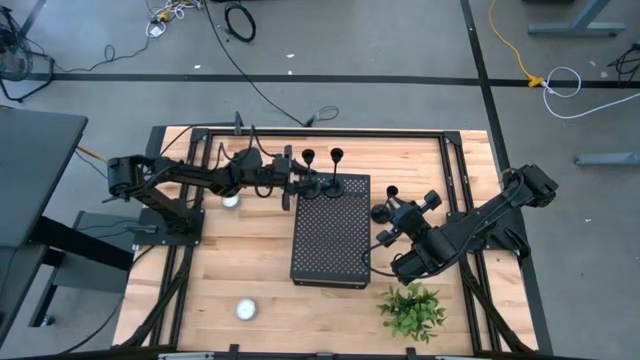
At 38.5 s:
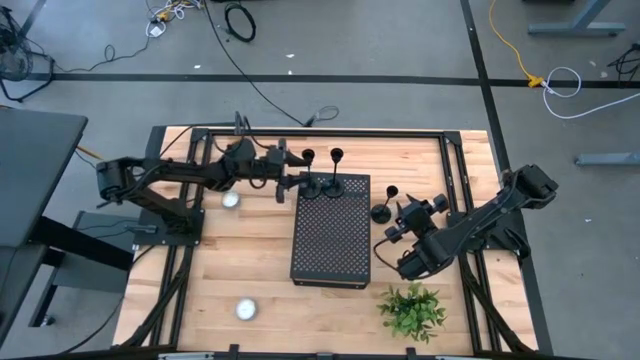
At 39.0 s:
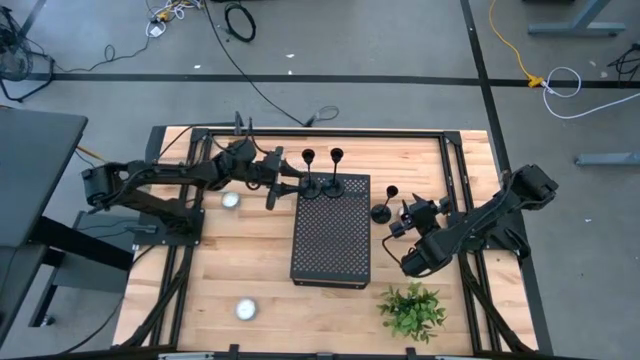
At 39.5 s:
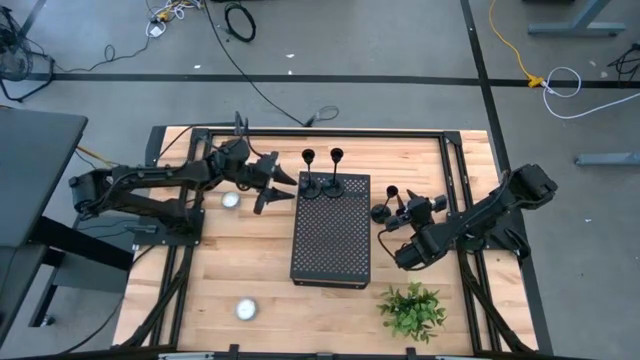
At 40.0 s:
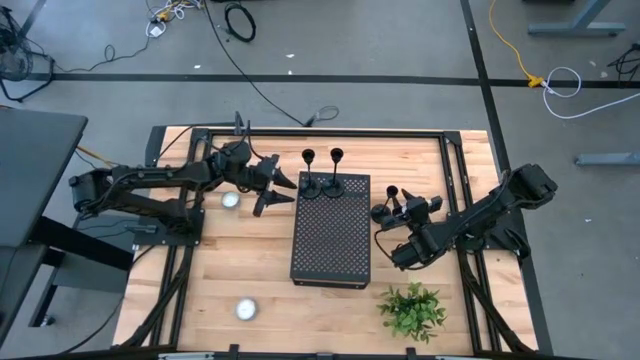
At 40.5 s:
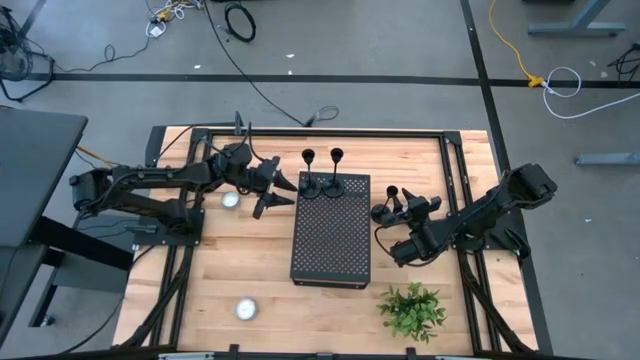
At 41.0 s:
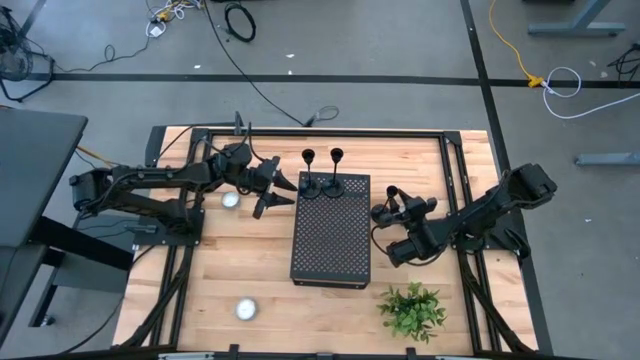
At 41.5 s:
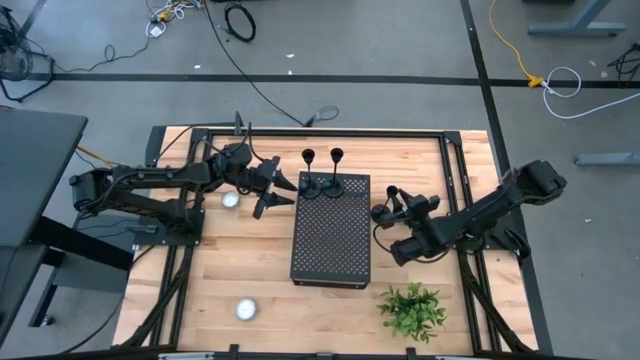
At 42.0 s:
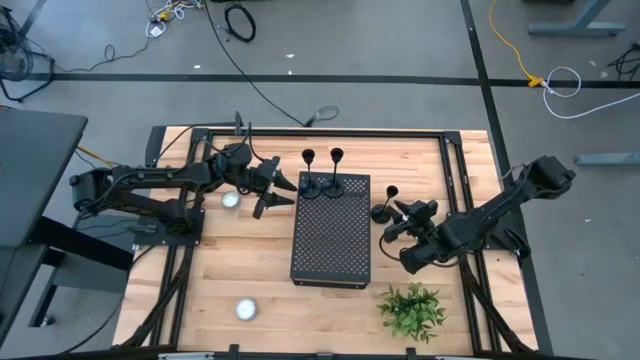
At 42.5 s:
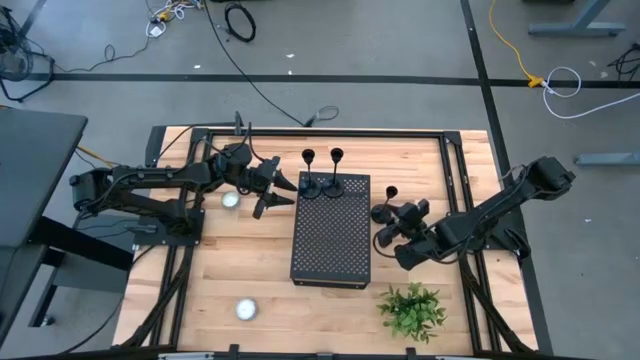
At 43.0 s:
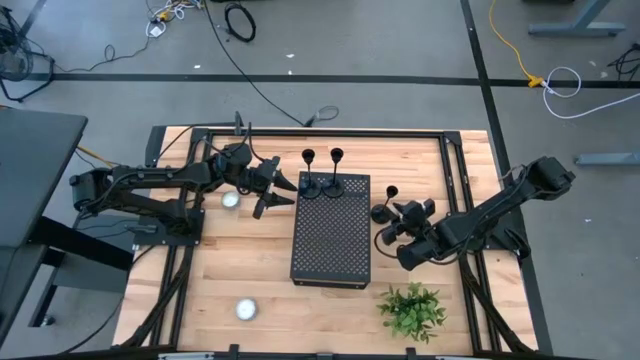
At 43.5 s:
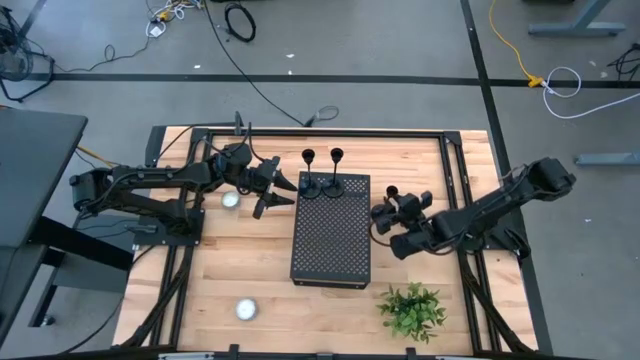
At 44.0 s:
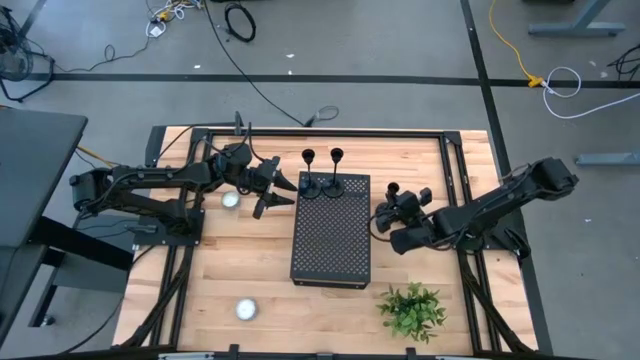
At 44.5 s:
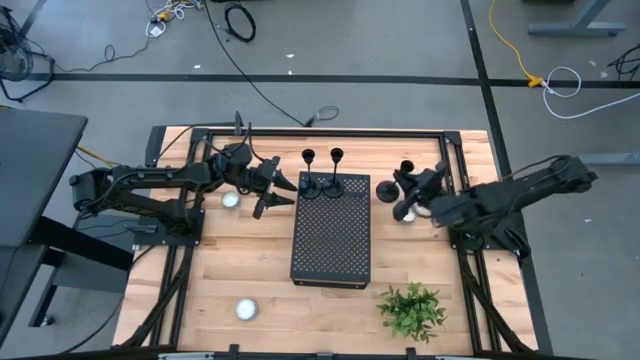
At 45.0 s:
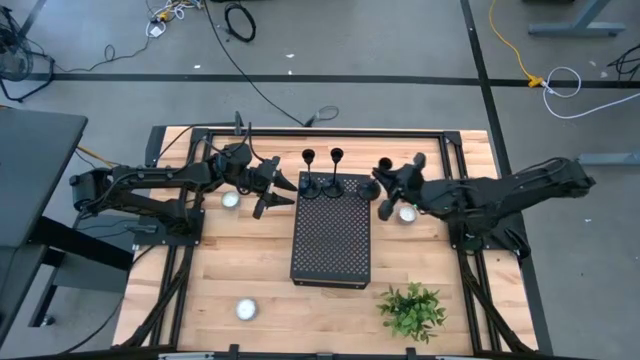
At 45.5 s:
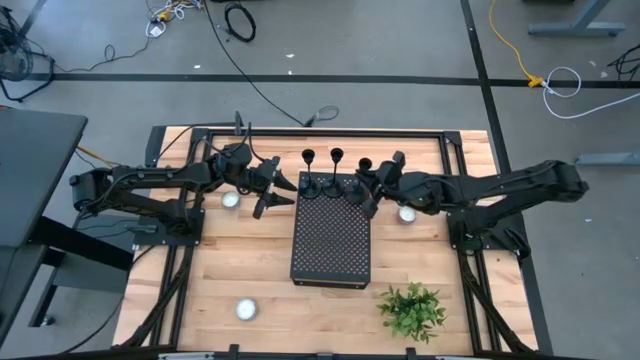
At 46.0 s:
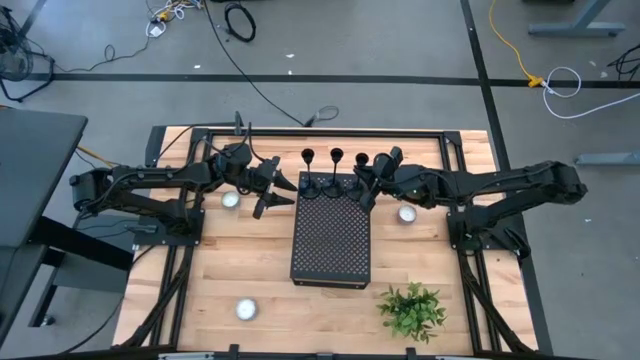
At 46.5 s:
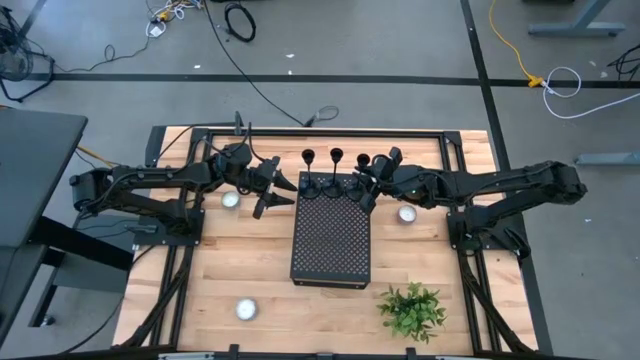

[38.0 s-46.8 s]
Task: Pick & Place candle stick holders
Put the black candle holder on the shelf

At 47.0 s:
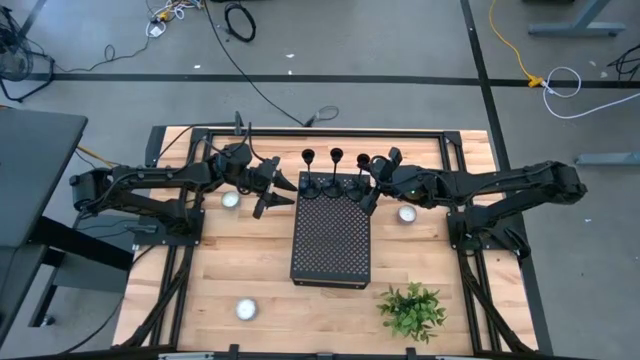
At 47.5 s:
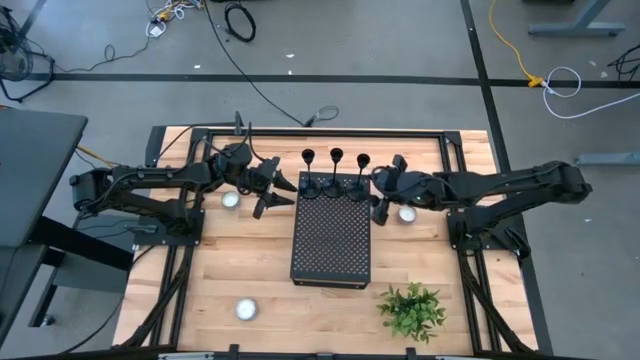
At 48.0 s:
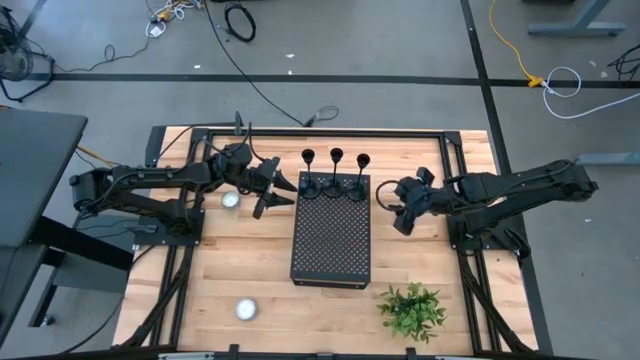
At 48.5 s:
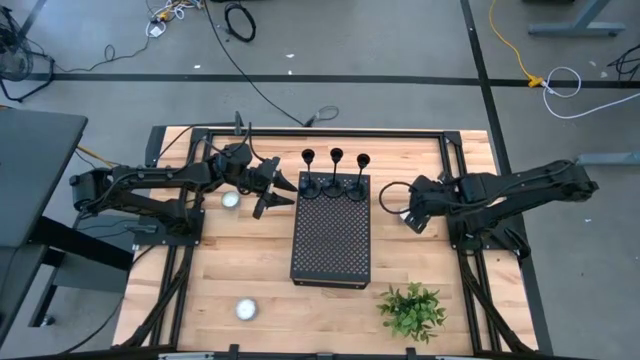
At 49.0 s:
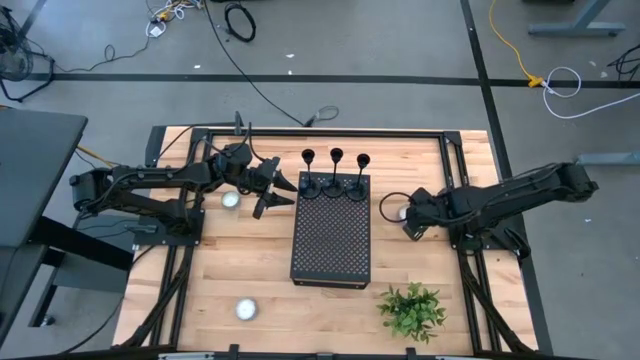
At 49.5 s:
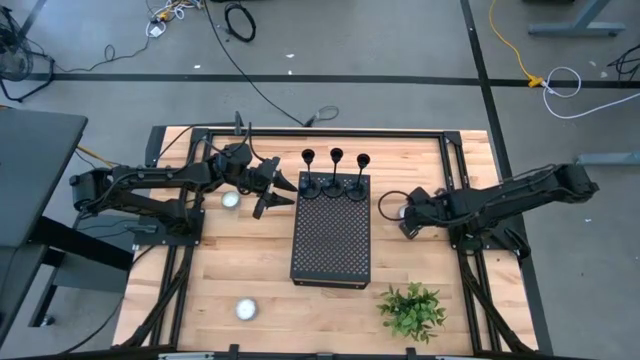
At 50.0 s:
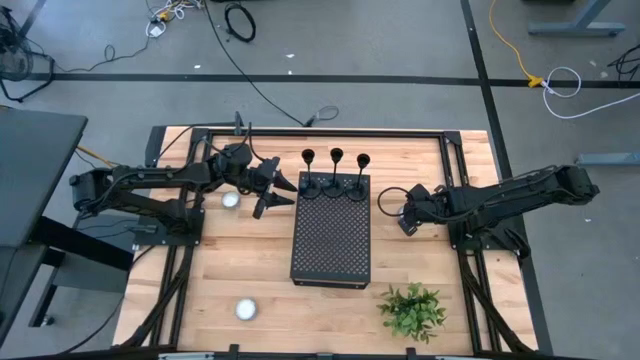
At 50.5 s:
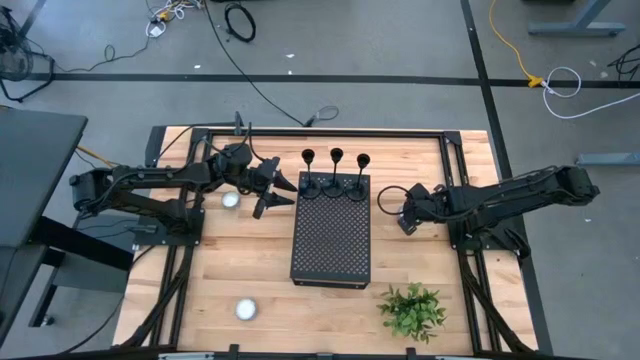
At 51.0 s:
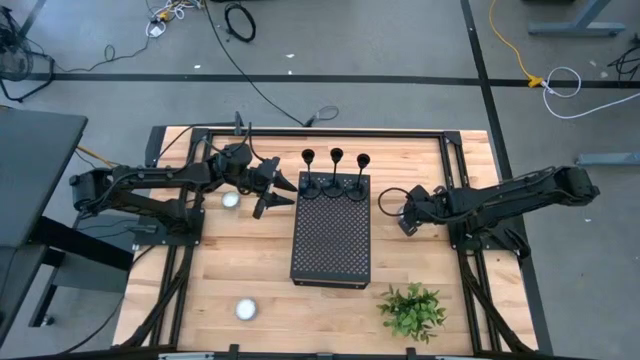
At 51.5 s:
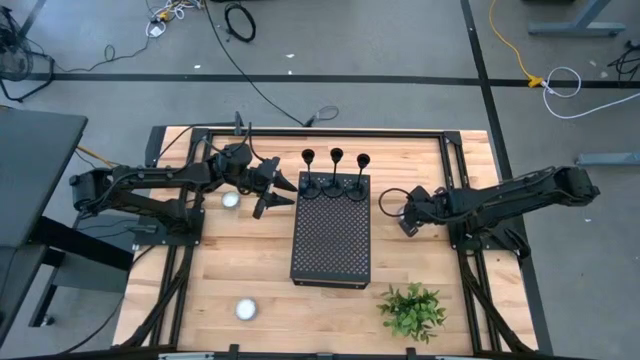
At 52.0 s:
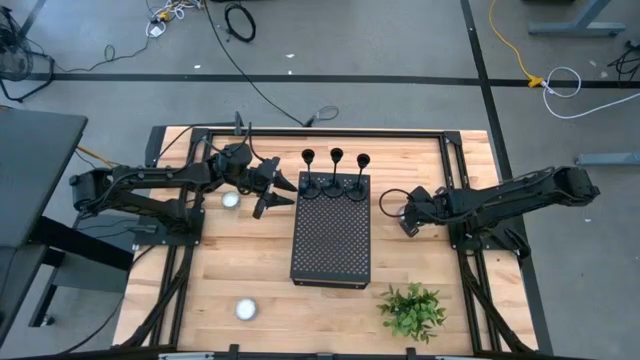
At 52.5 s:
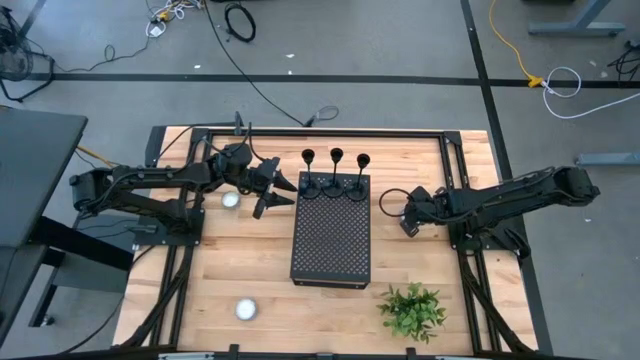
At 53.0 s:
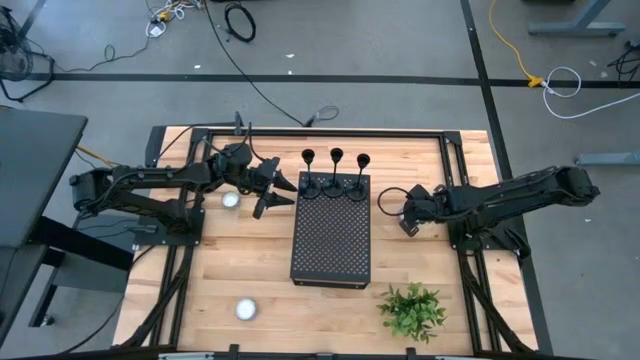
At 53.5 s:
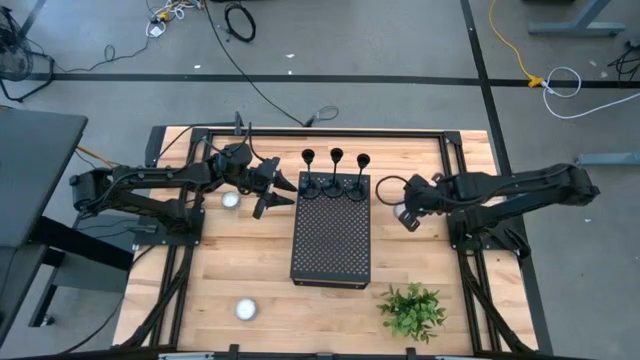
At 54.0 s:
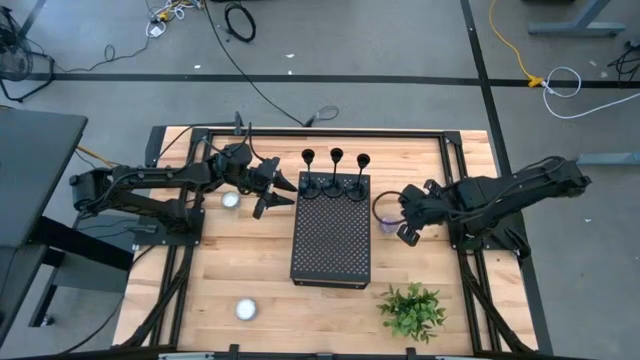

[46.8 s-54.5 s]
Put the purple scented candle on the shelf

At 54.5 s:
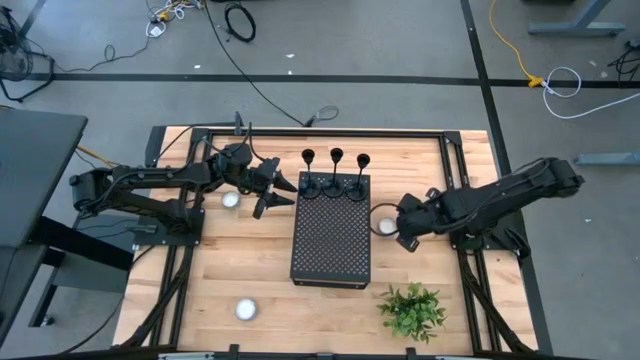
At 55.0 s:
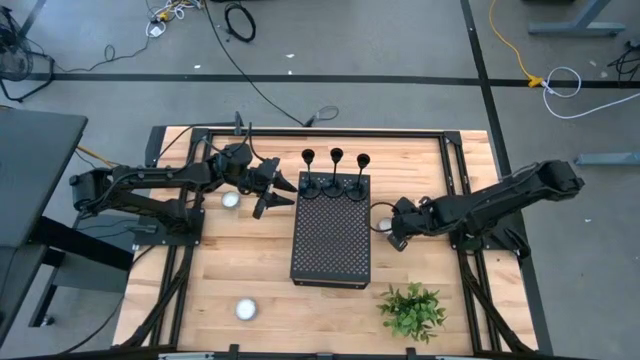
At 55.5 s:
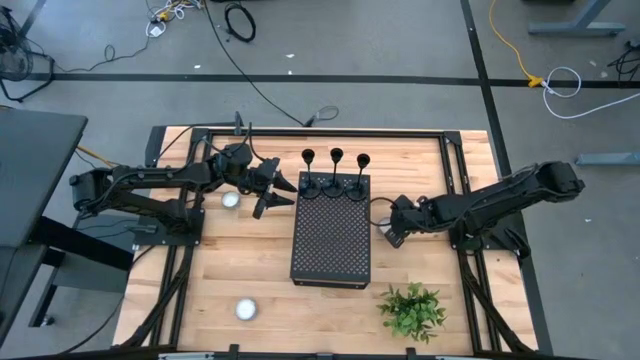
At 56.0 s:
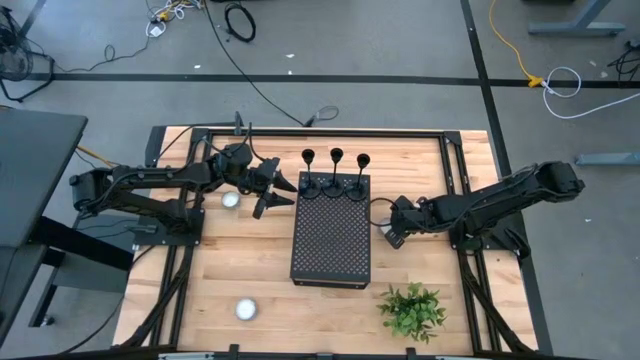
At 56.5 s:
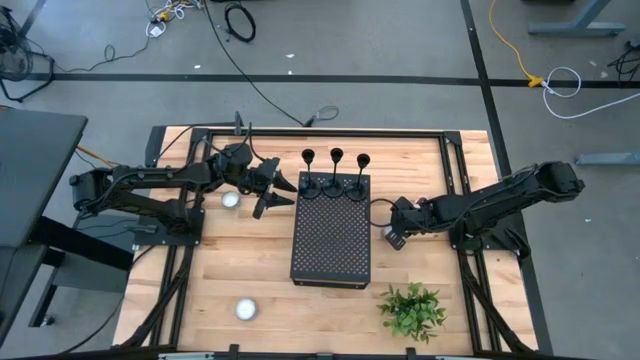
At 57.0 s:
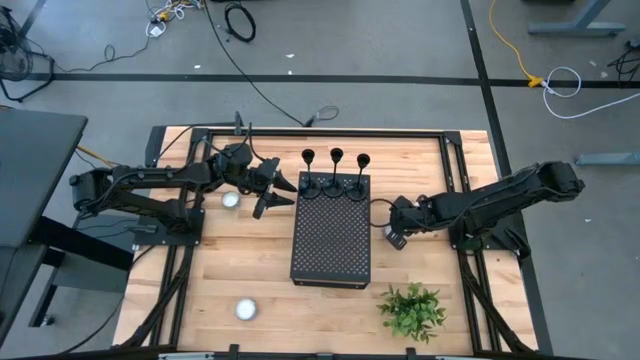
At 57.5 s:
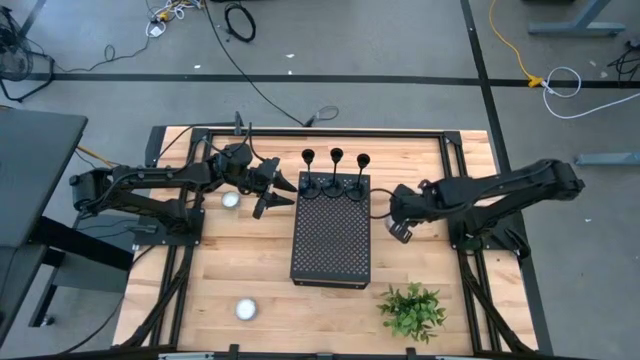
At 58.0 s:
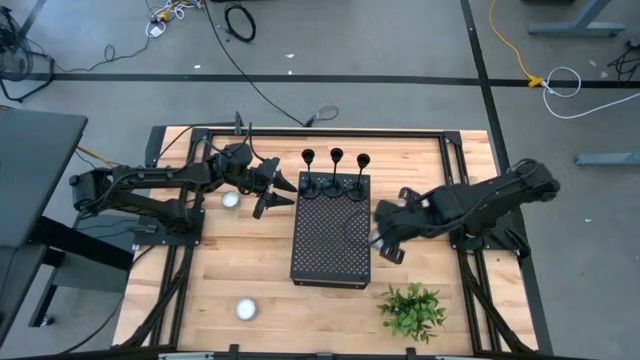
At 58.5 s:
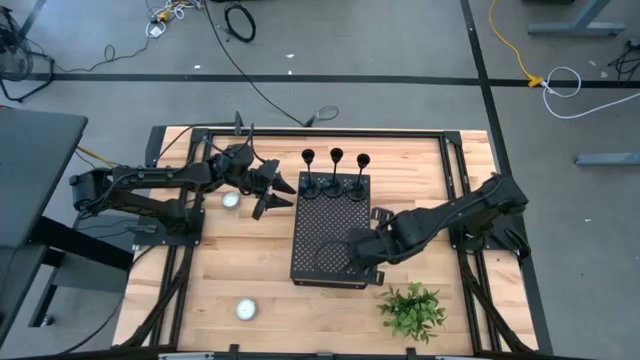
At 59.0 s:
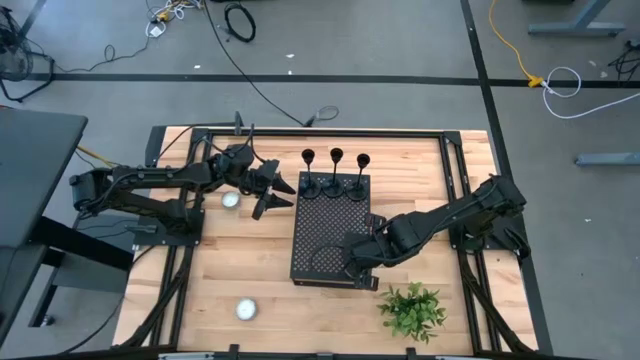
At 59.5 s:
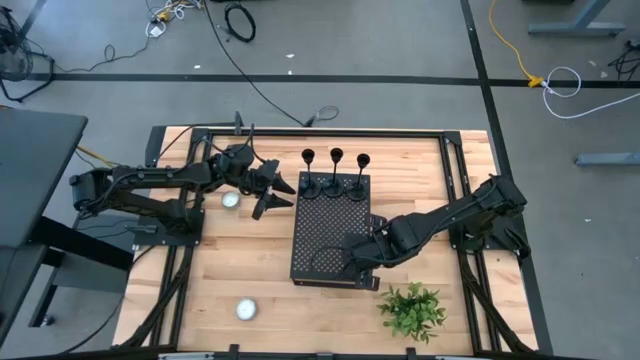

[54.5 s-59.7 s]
Put the purple scented candle on the shelf
